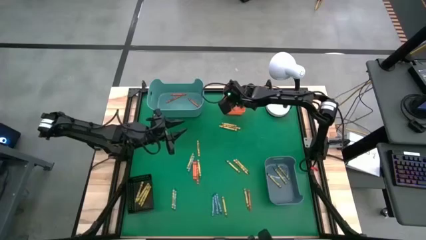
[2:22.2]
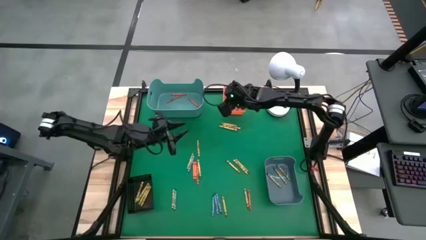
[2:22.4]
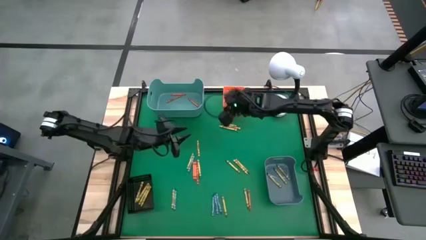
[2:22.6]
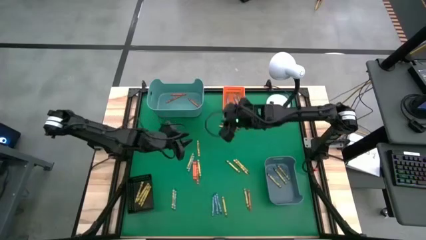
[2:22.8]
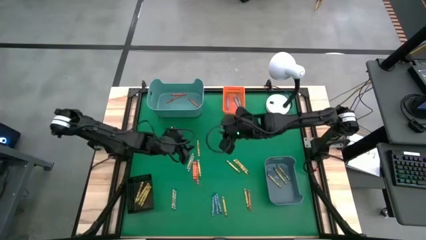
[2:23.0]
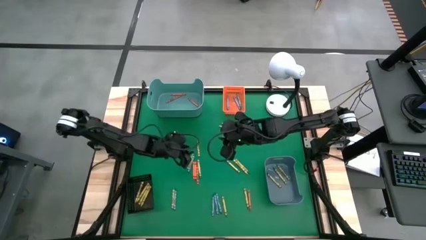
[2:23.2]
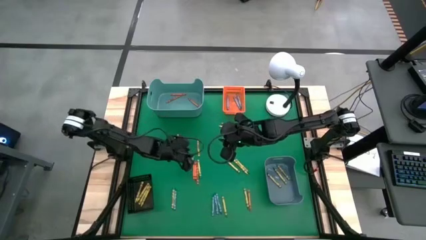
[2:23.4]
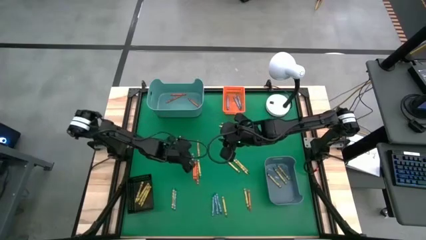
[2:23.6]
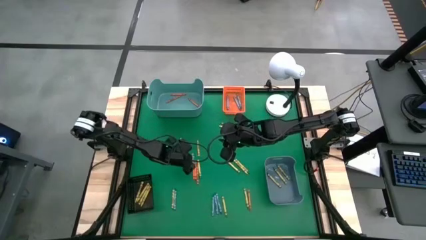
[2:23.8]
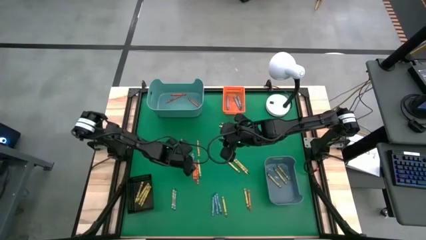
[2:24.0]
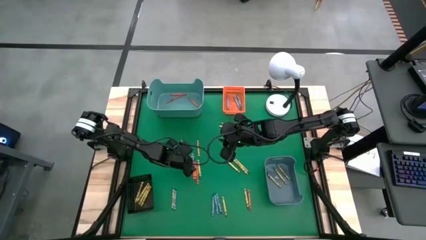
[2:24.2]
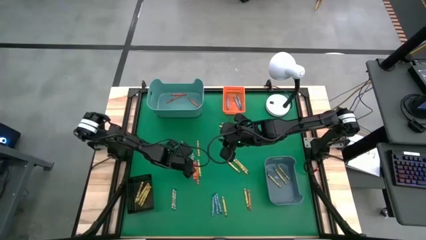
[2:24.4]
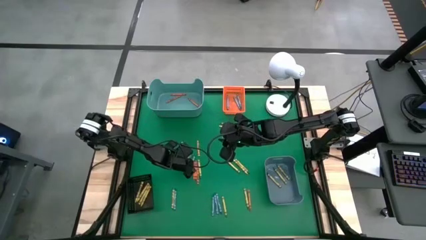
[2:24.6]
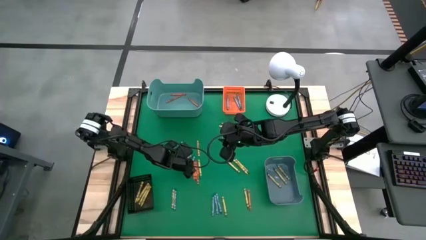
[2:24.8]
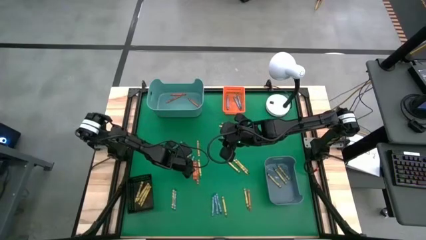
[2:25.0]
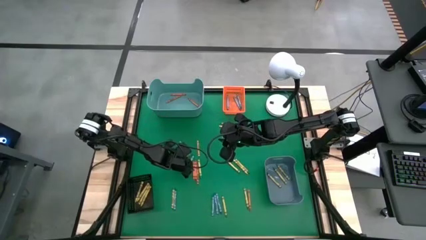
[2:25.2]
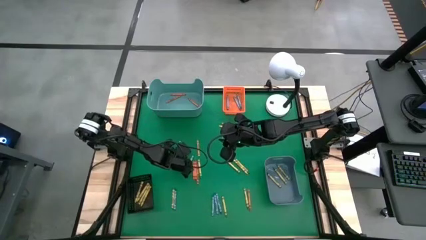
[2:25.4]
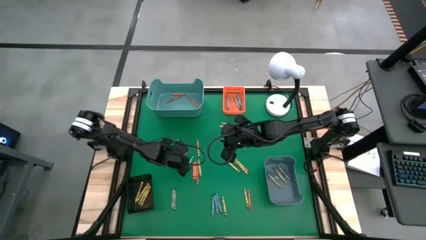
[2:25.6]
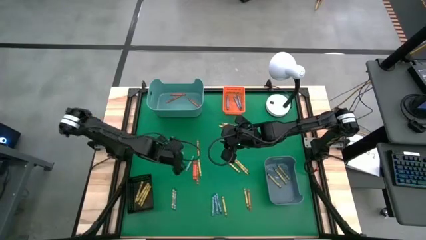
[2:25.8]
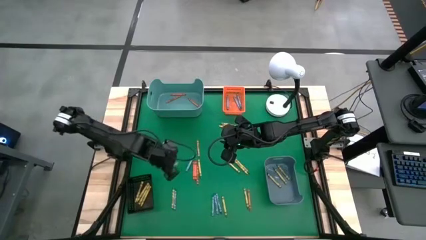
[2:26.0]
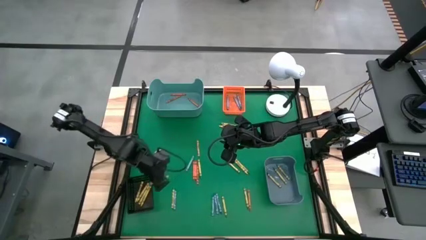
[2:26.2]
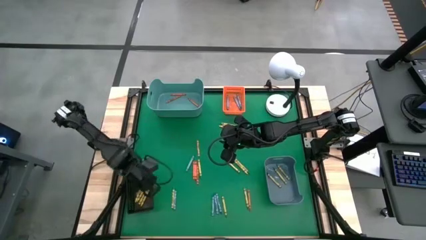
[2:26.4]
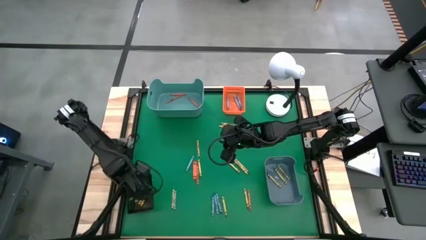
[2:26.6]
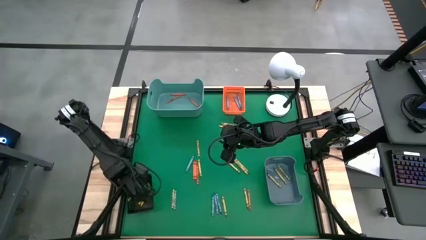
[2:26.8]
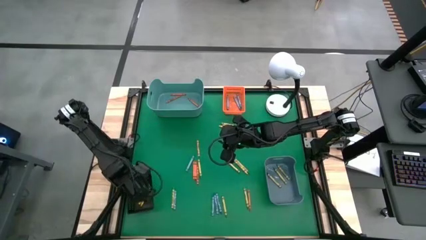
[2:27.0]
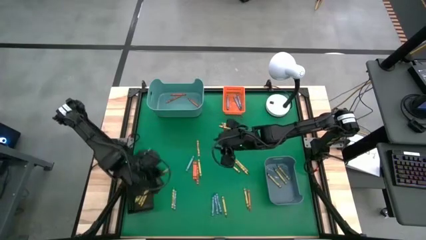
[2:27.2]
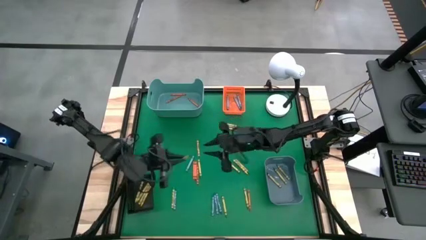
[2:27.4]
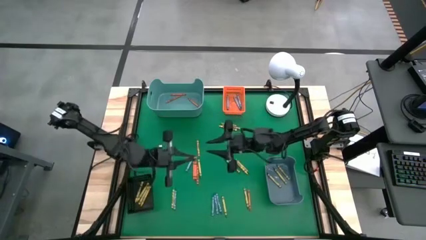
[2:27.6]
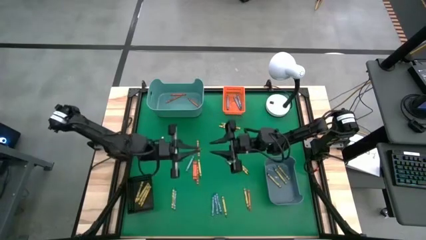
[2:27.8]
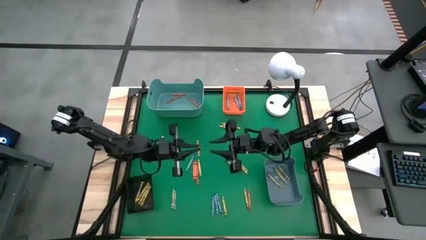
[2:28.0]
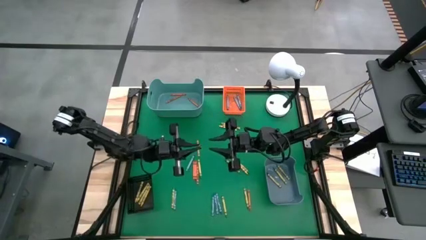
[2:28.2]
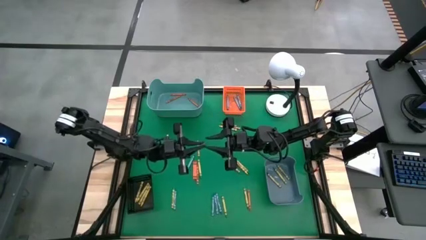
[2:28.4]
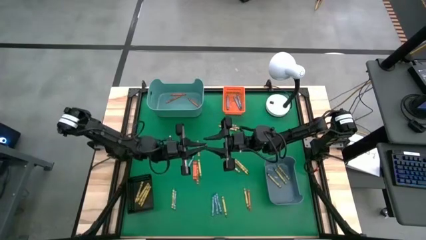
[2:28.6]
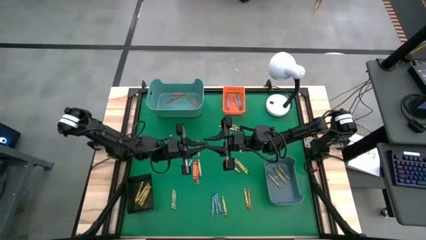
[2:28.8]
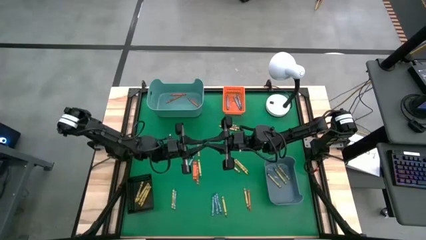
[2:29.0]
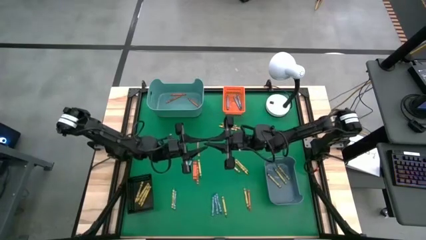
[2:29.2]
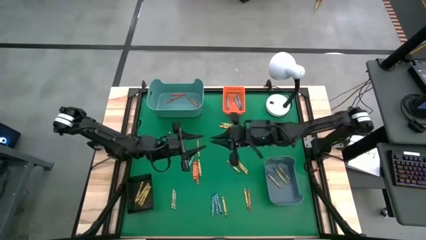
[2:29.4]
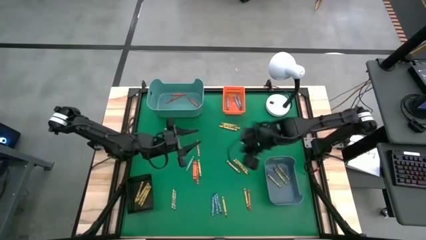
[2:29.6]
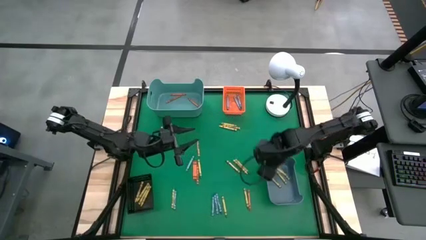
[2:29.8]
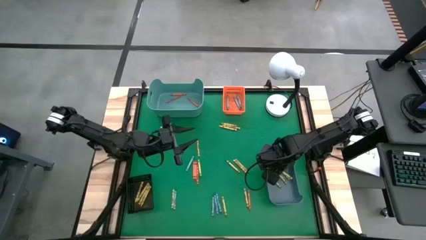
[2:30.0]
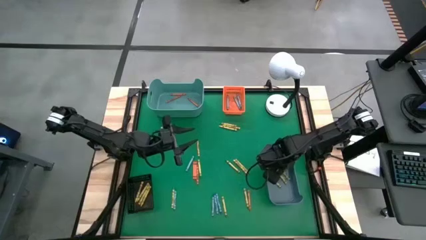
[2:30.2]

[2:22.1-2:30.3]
Task: Sort crayons
Put the green crayon into the blue bin

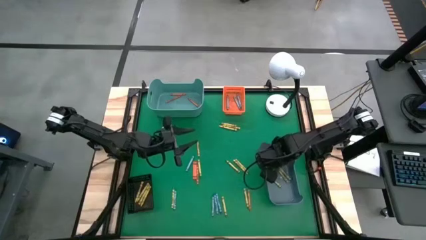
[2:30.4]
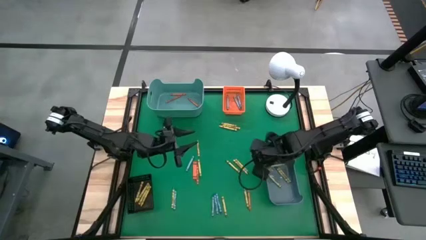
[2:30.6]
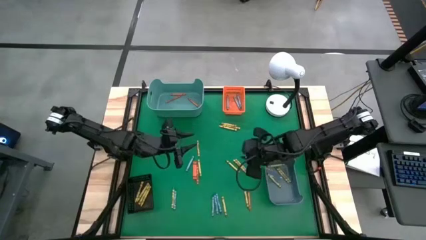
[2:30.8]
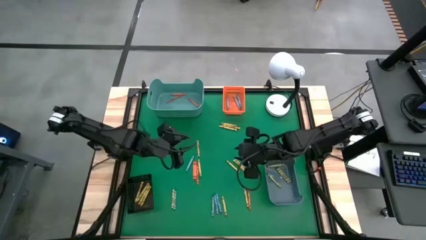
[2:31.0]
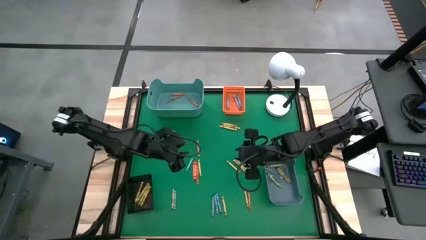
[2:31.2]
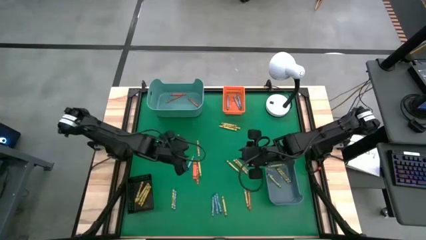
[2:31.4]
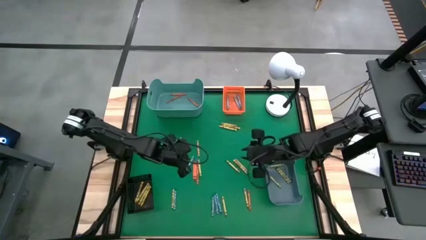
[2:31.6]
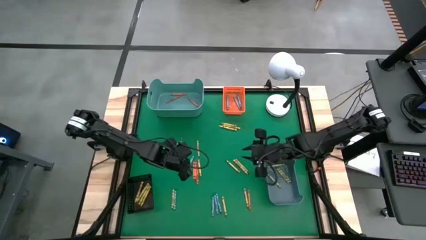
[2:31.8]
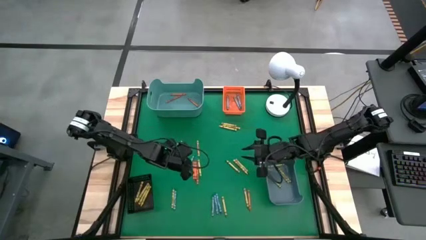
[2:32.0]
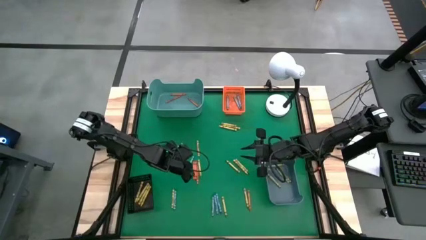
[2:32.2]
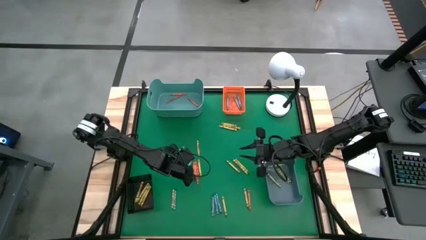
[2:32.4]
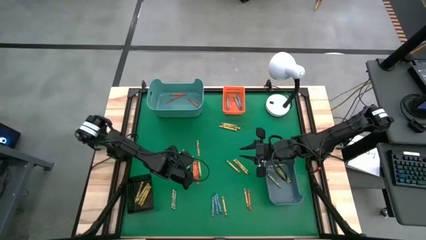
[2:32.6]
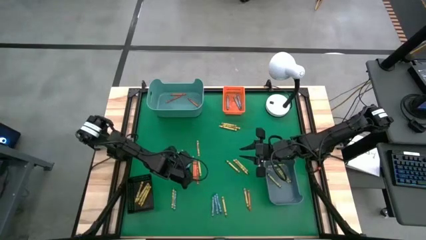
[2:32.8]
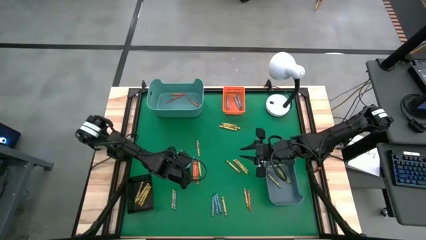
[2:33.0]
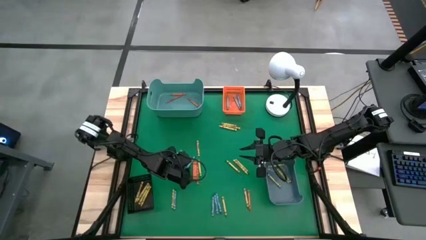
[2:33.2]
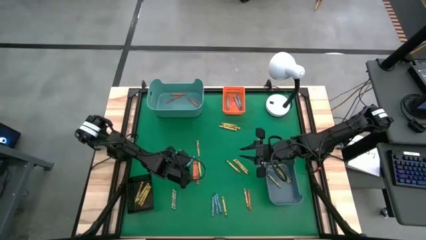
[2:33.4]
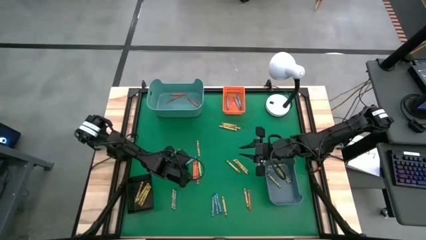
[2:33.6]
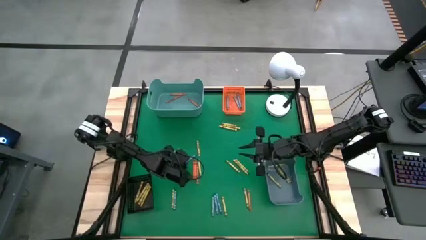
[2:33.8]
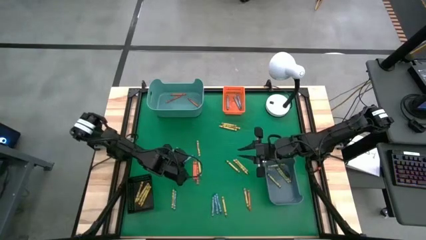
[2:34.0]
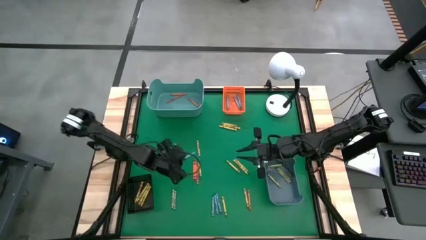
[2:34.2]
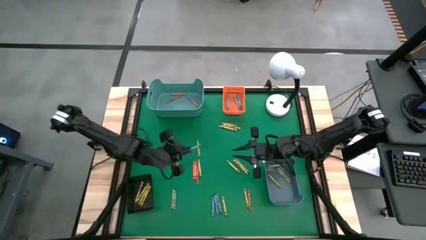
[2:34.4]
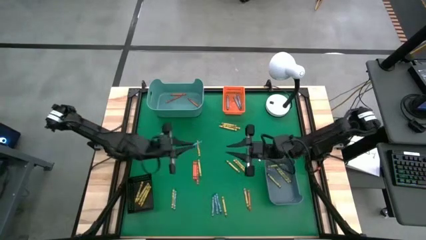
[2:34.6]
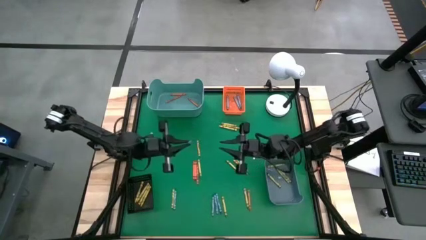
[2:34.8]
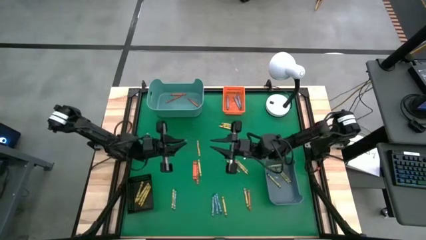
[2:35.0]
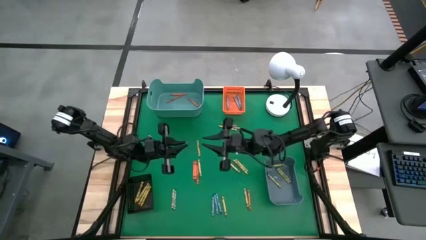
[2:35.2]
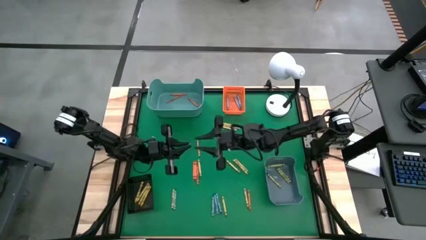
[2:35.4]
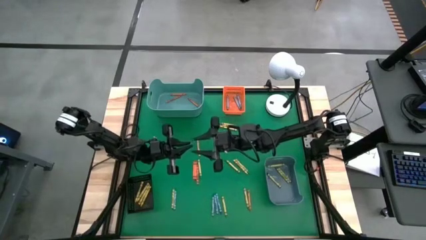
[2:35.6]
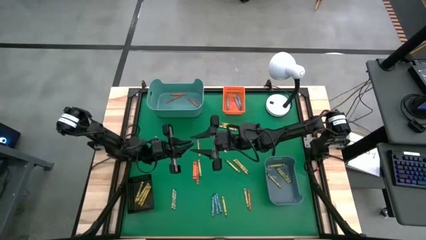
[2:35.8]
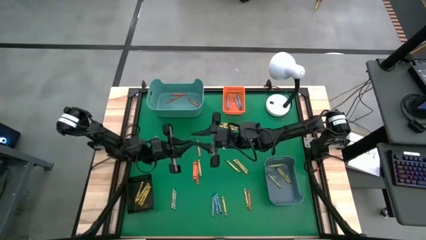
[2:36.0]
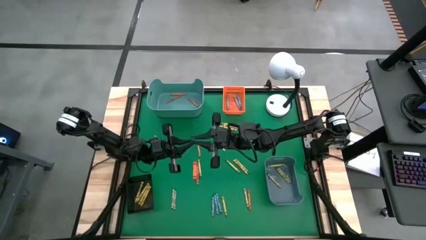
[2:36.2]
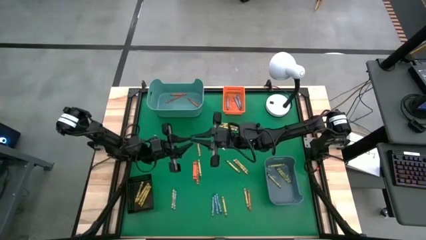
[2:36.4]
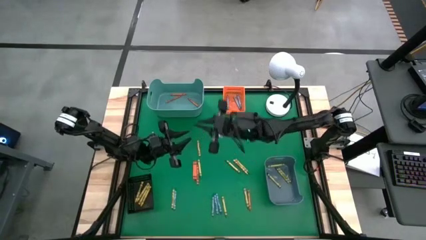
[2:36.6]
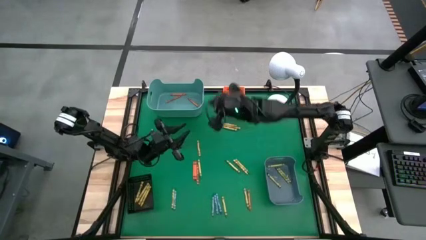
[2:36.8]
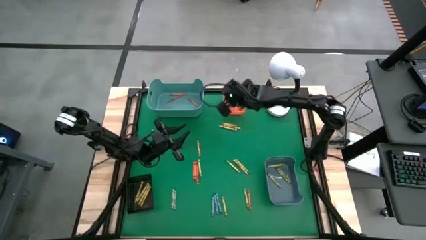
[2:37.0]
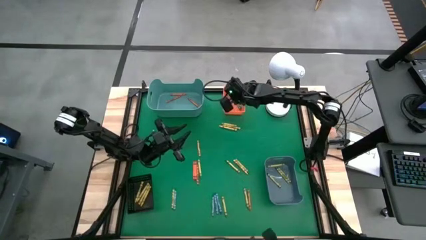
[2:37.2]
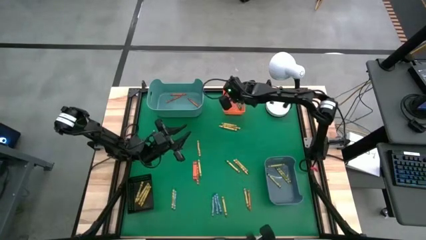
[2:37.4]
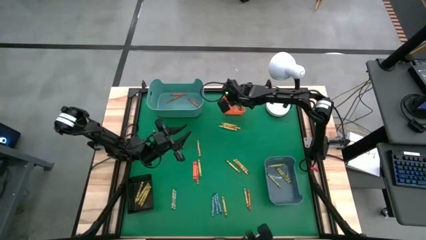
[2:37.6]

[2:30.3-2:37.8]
Put the blue crayon into the orange bin
